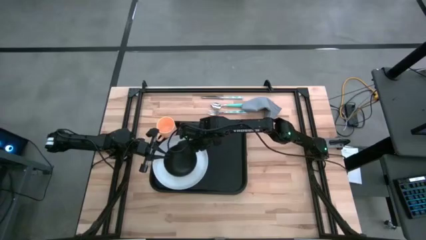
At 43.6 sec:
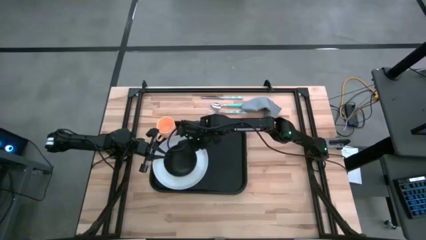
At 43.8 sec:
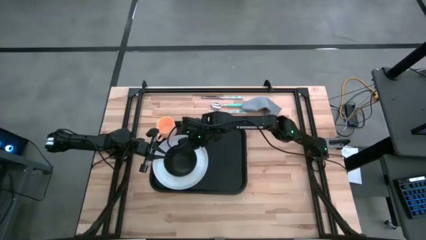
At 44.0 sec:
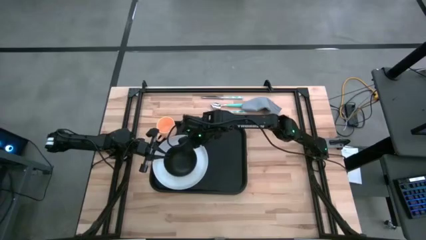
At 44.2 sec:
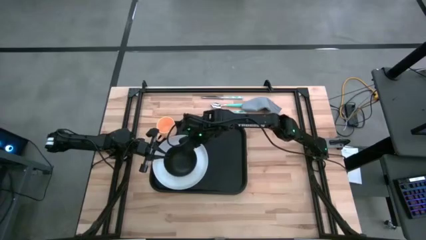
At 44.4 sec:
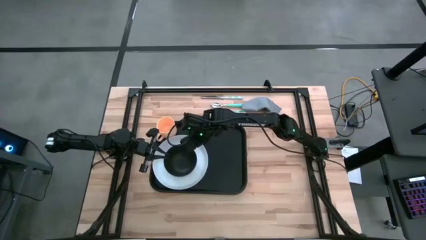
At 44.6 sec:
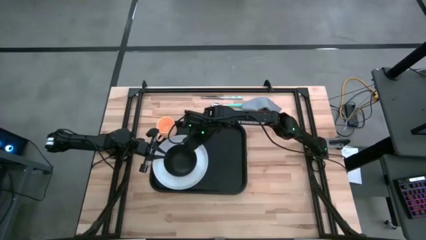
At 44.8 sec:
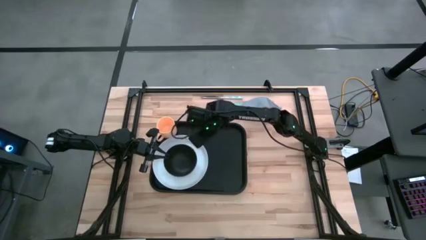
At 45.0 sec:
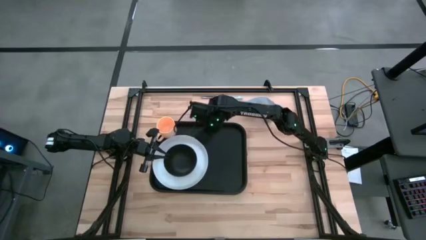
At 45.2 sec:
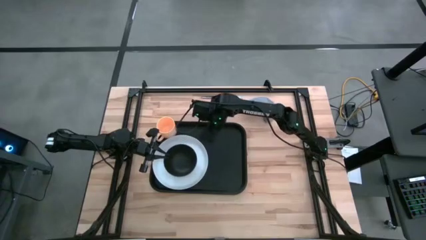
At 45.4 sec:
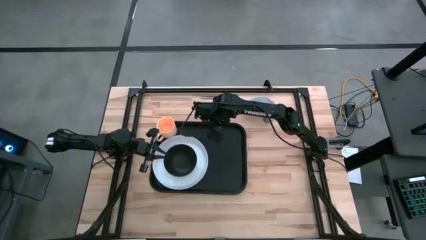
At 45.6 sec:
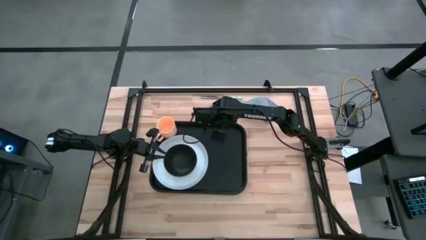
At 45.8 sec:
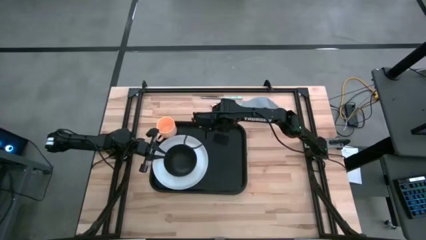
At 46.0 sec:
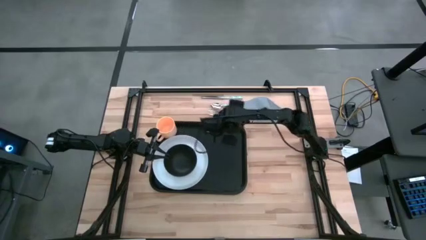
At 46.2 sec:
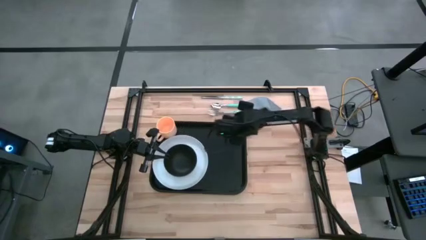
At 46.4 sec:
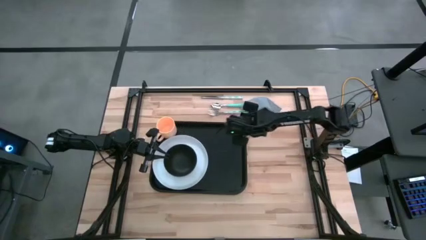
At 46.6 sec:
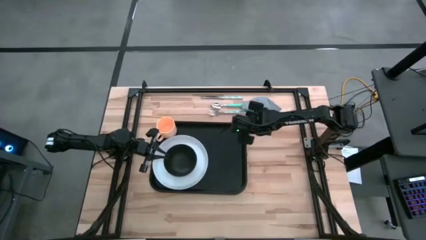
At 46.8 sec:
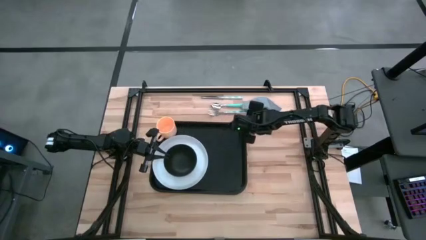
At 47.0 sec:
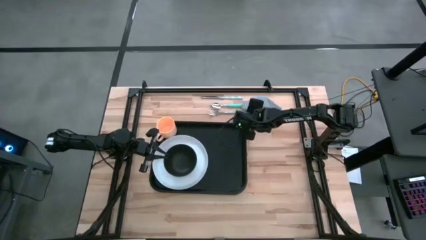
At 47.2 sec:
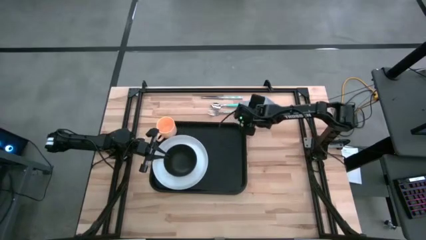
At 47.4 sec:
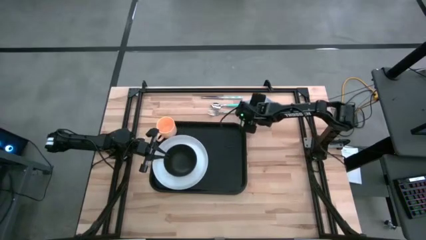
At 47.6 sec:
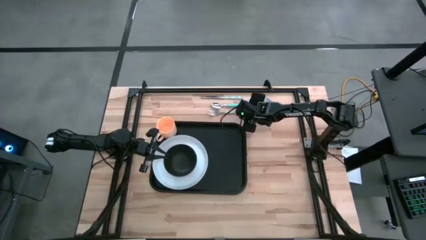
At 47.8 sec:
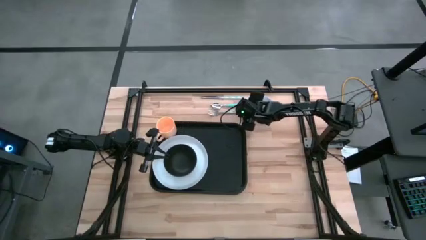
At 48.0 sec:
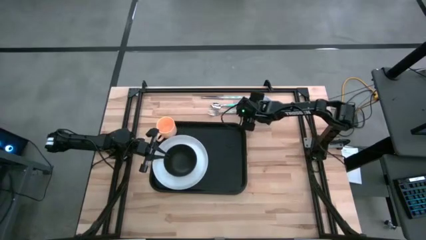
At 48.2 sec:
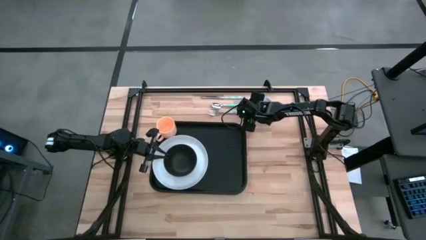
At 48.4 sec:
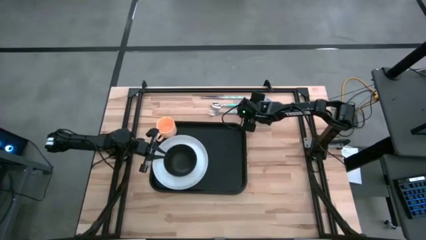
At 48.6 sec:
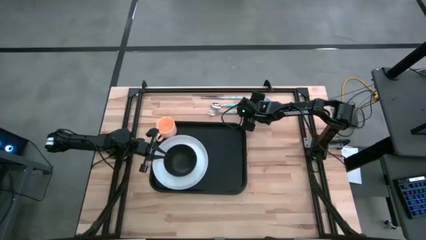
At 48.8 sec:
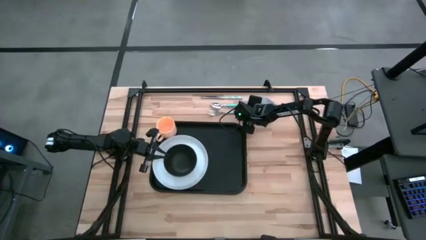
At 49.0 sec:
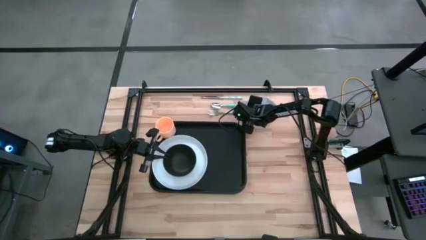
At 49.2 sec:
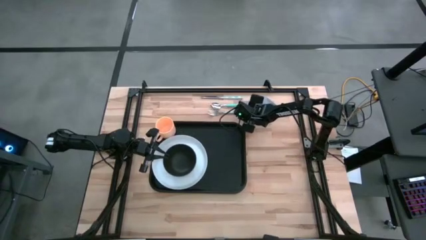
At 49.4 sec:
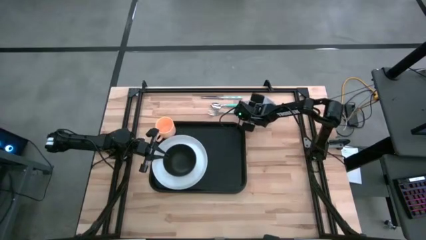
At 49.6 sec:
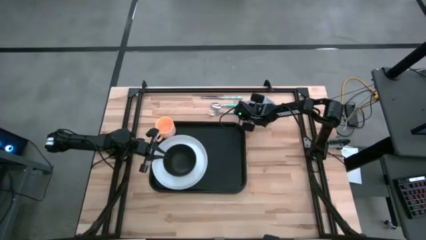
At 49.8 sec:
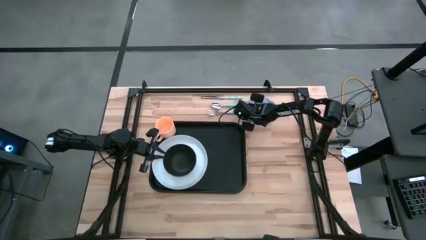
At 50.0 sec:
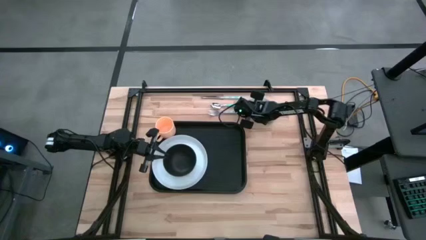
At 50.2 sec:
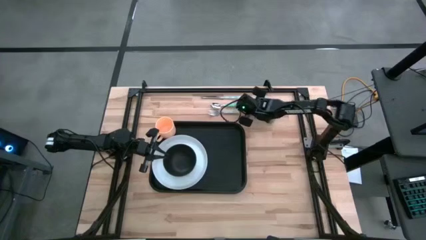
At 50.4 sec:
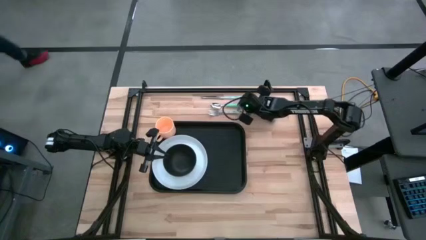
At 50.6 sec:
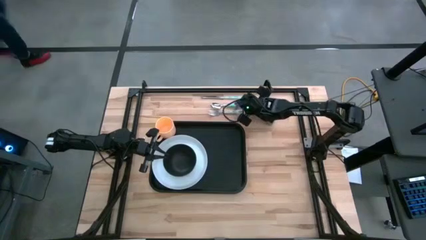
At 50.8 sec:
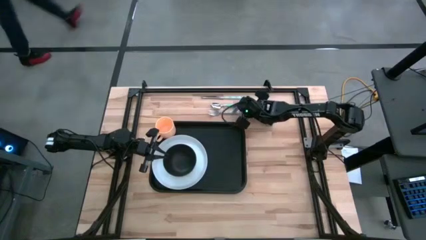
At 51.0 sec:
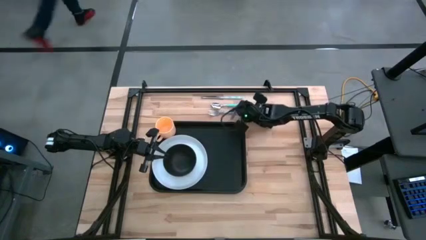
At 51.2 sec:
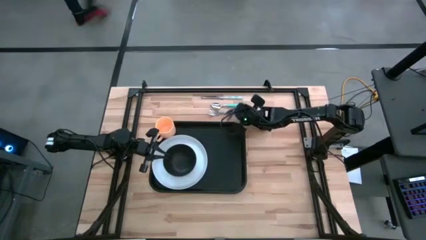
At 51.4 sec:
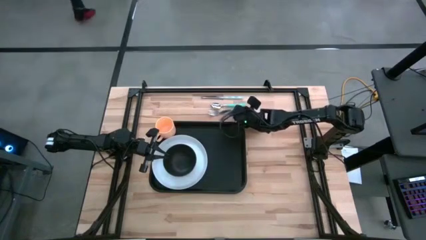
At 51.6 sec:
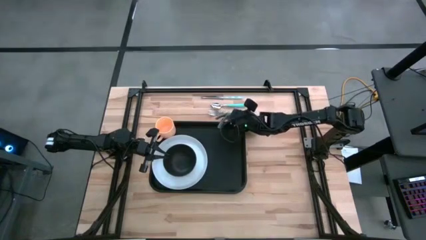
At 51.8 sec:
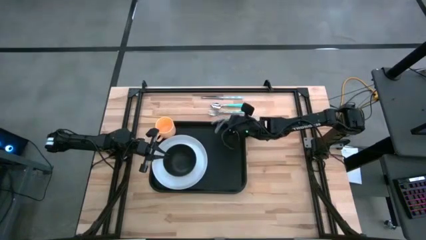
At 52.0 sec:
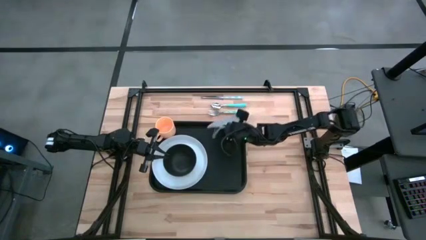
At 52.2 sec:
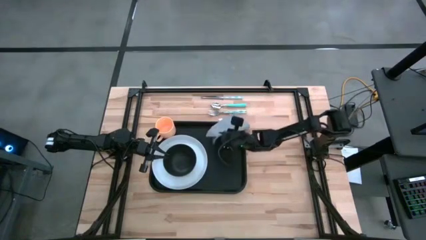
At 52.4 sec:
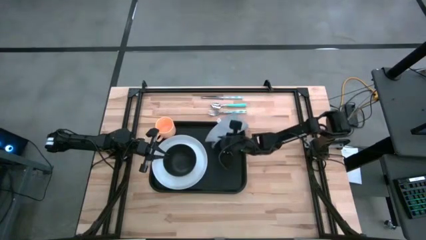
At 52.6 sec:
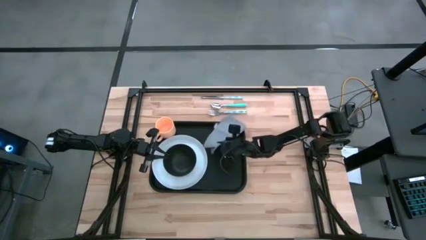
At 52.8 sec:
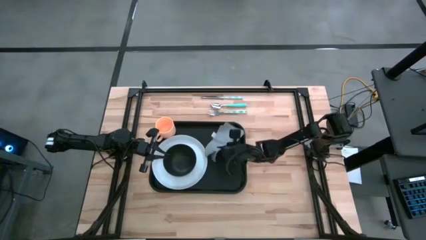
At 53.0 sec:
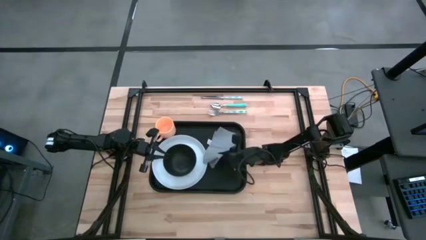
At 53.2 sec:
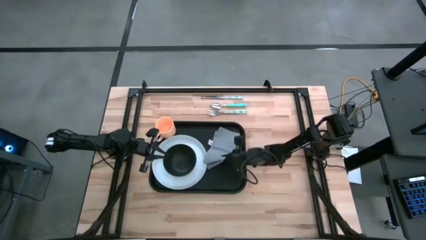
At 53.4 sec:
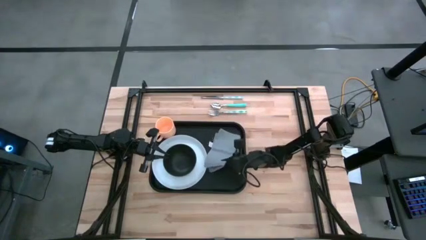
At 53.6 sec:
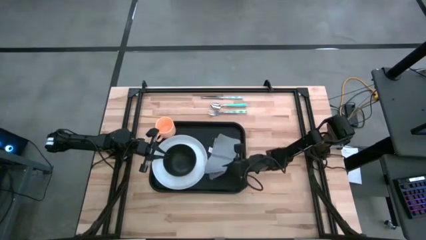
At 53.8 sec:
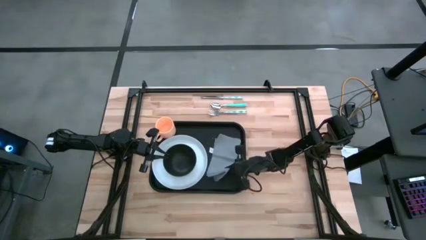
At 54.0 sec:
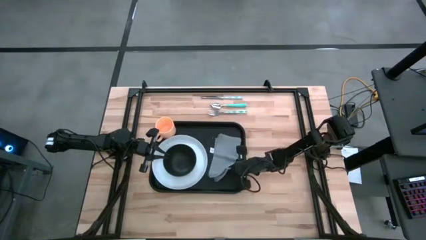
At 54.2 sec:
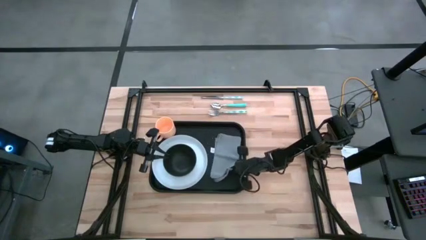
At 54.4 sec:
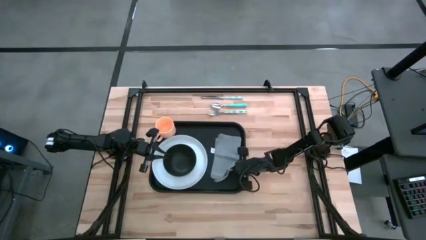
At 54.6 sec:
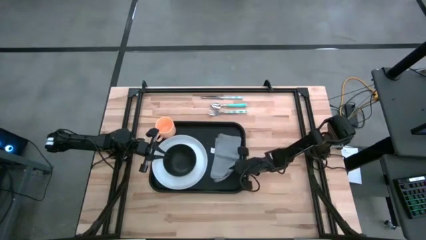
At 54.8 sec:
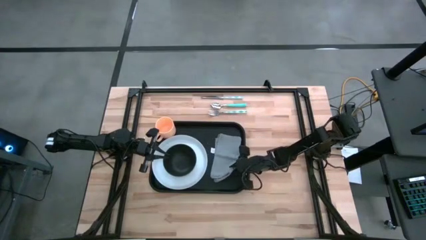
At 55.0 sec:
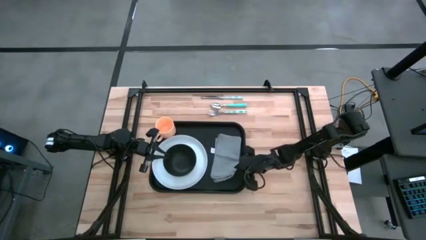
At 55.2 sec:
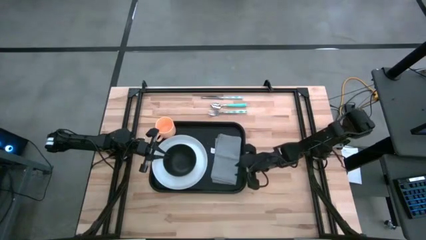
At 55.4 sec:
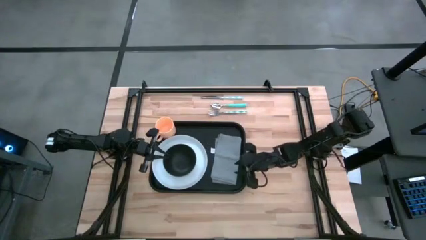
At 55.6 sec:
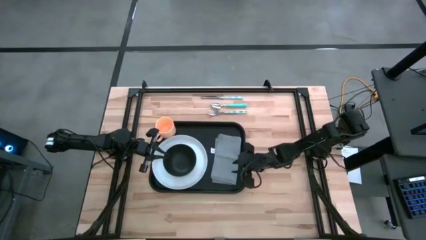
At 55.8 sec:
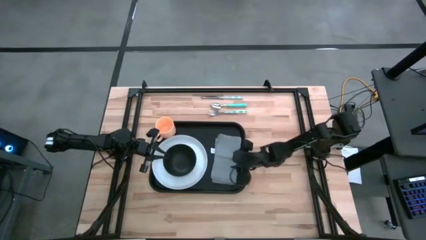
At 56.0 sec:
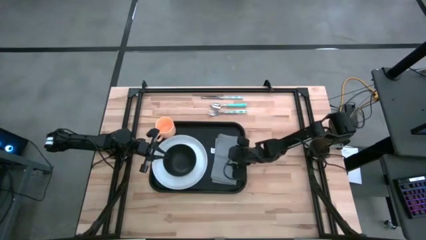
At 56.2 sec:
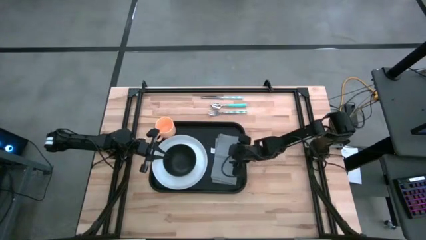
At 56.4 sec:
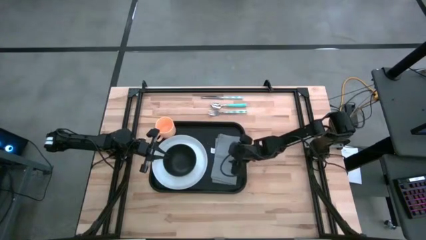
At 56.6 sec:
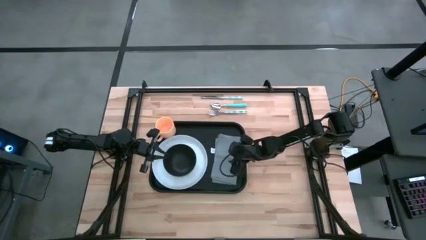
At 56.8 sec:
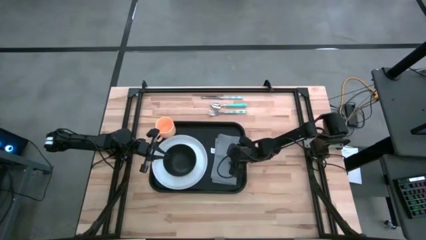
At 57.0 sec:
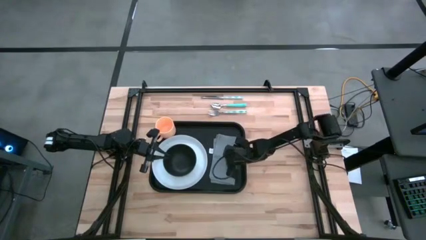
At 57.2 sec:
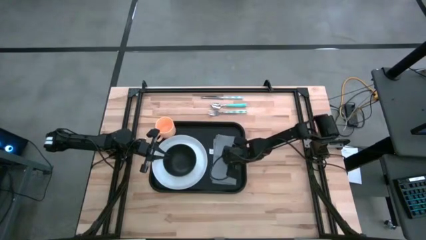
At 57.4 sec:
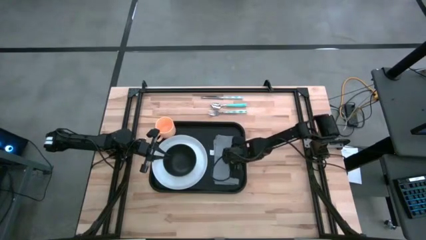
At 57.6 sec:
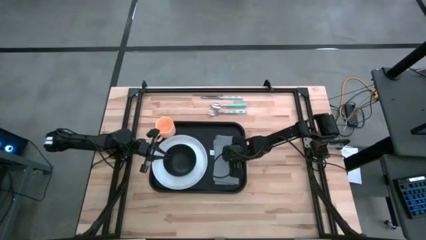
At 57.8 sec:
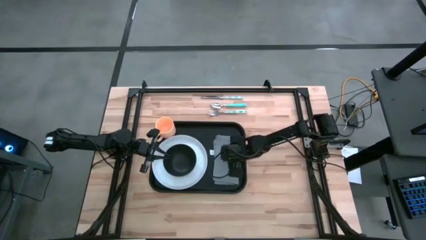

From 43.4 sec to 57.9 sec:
Task: Set up tray
Put the gray napkin to the right of the white plate on the black tray
